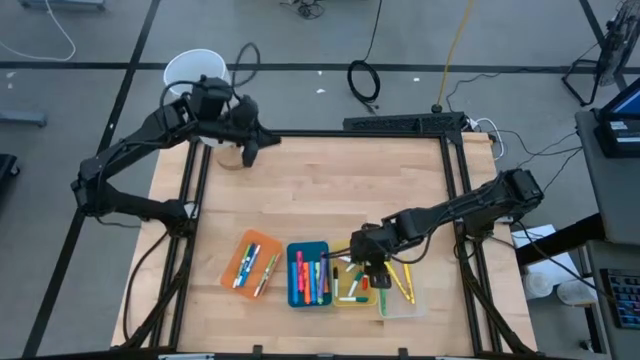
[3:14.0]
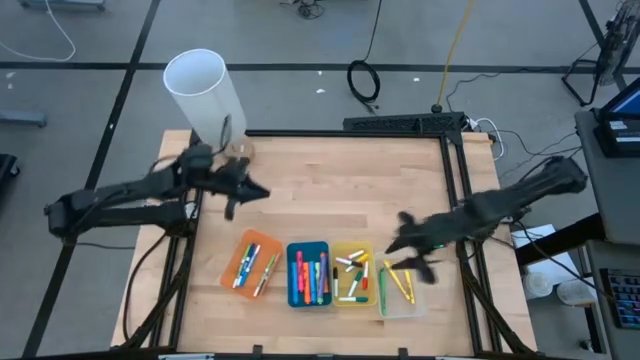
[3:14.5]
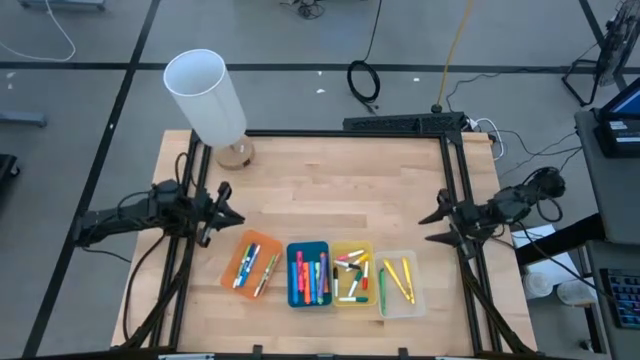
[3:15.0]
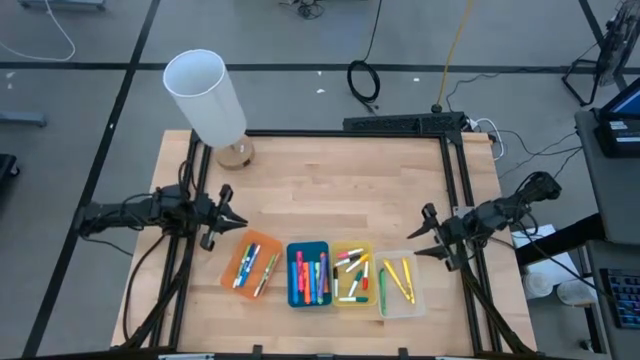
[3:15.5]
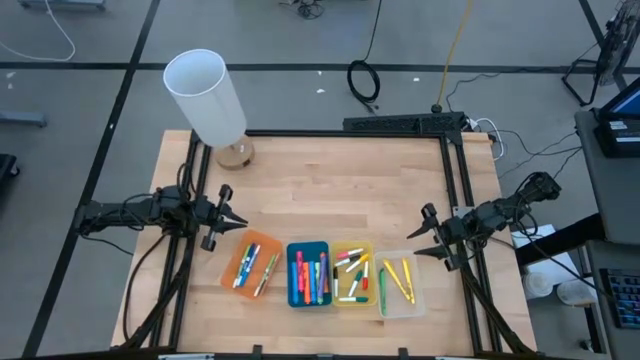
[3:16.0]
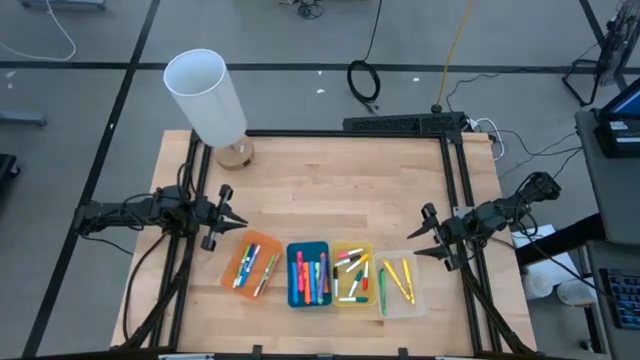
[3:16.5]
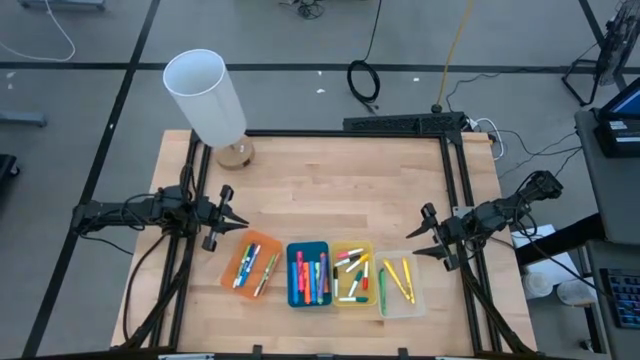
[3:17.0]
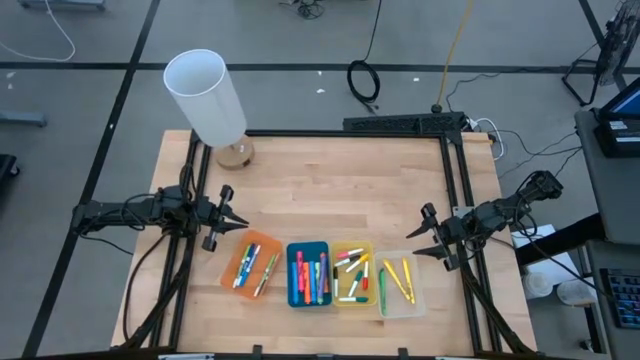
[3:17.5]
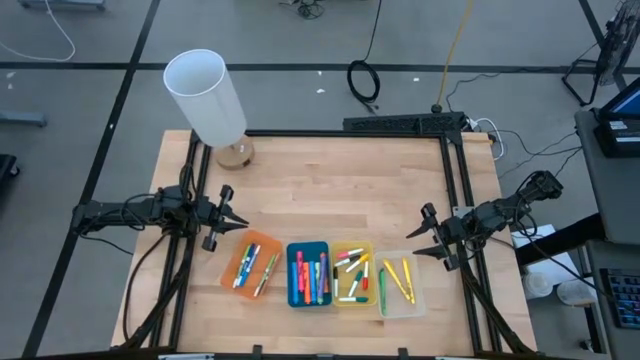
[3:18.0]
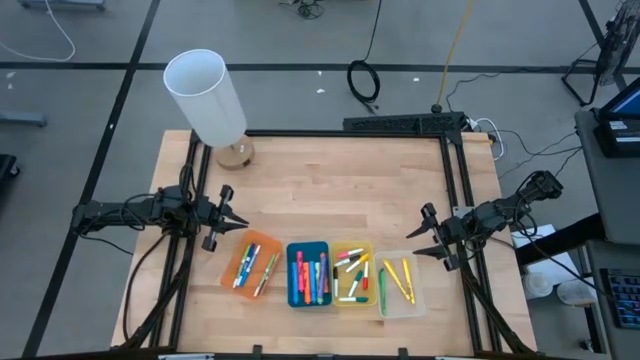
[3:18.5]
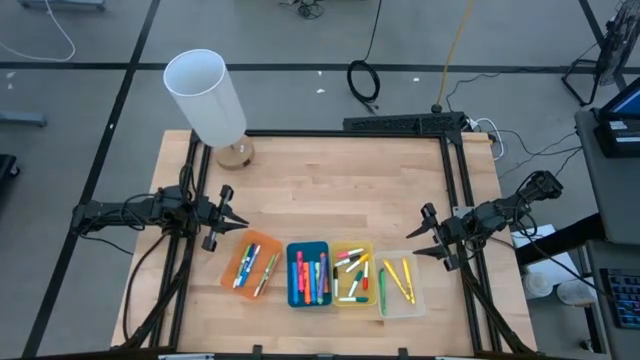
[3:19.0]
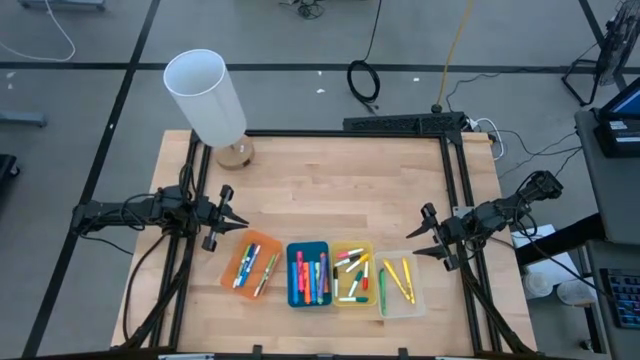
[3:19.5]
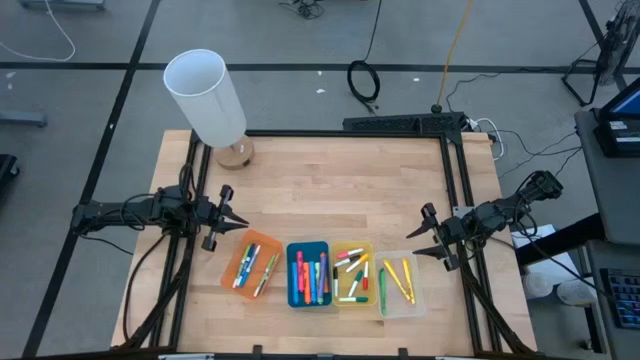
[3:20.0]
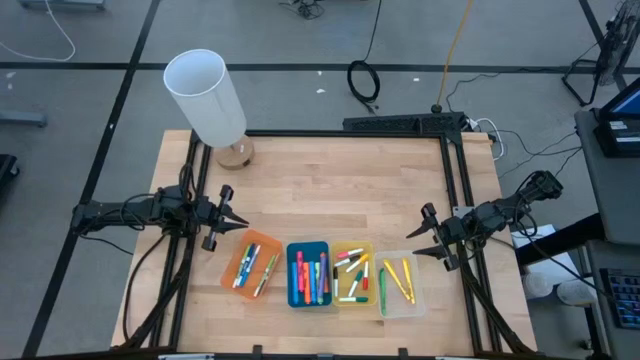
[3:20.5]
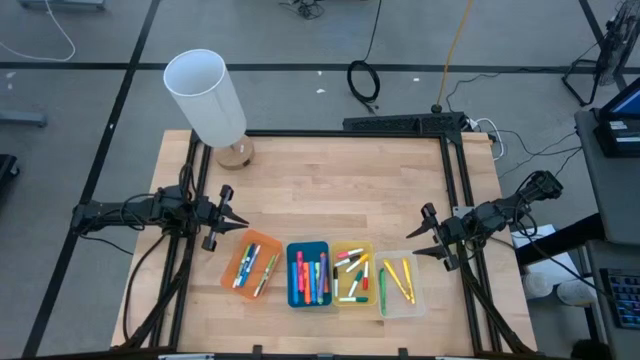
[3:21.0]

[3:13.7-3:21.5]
Task: Pick & Place Markers
Return to Home Position

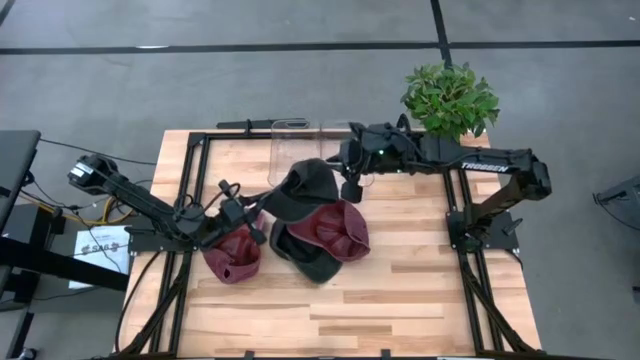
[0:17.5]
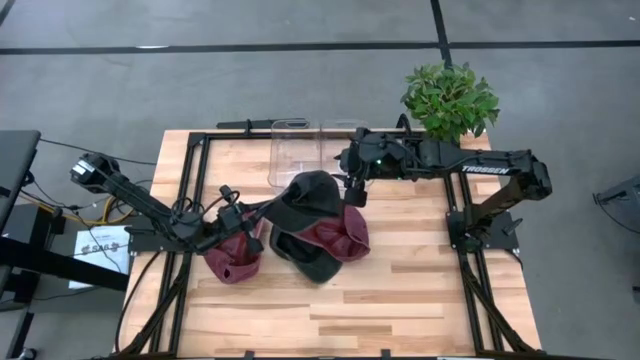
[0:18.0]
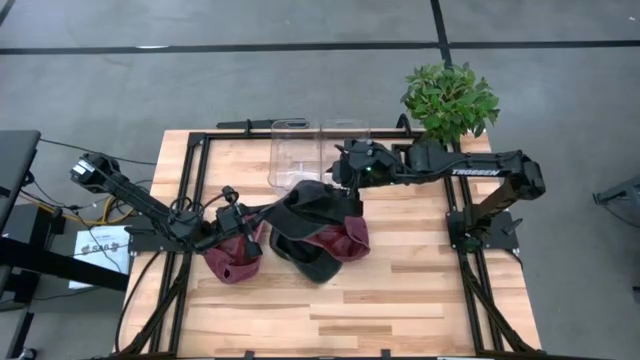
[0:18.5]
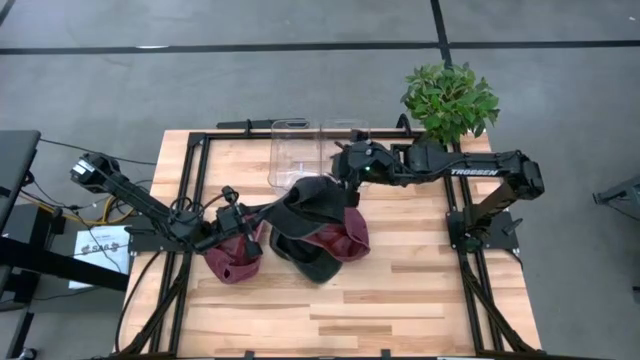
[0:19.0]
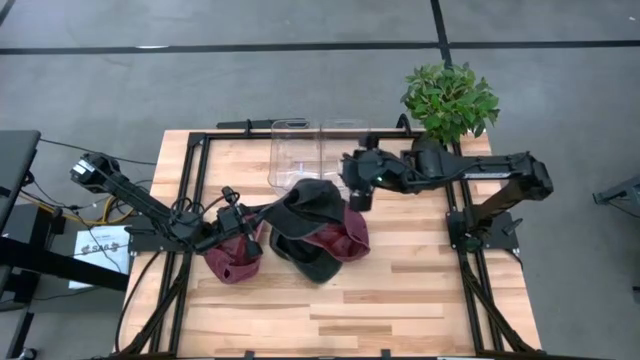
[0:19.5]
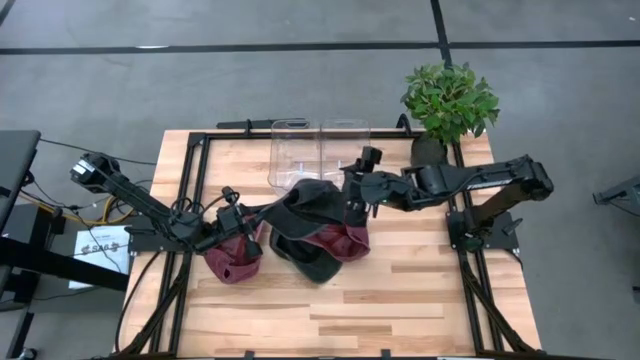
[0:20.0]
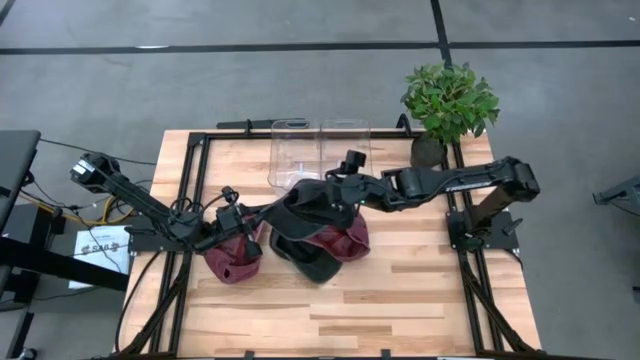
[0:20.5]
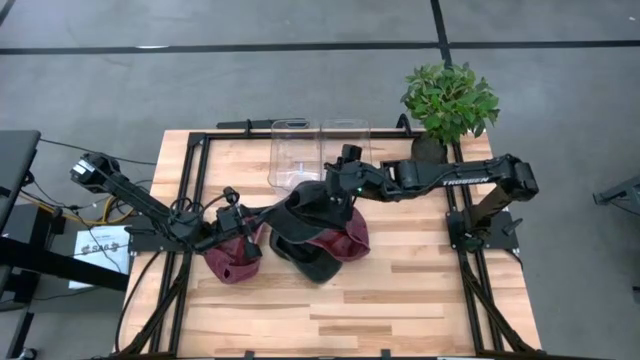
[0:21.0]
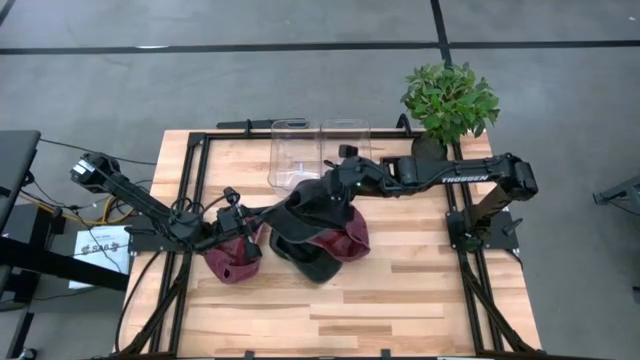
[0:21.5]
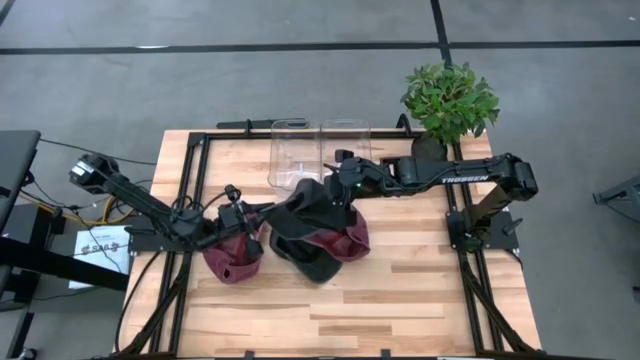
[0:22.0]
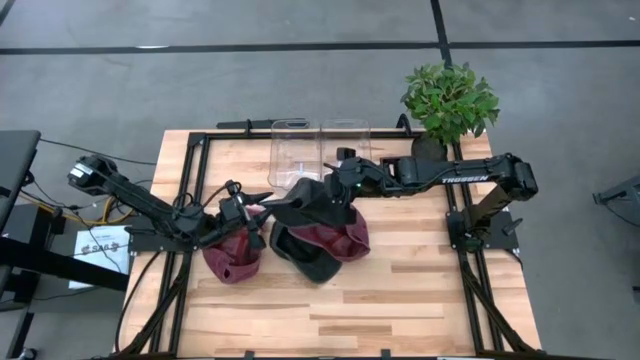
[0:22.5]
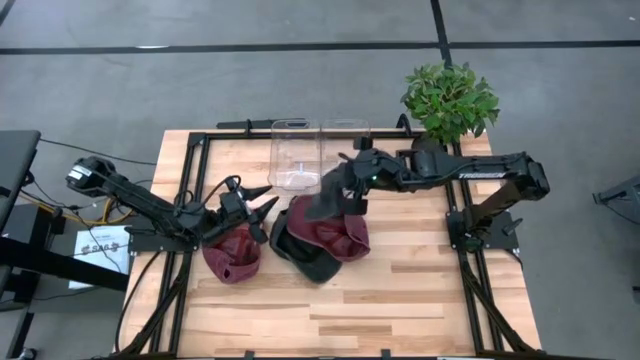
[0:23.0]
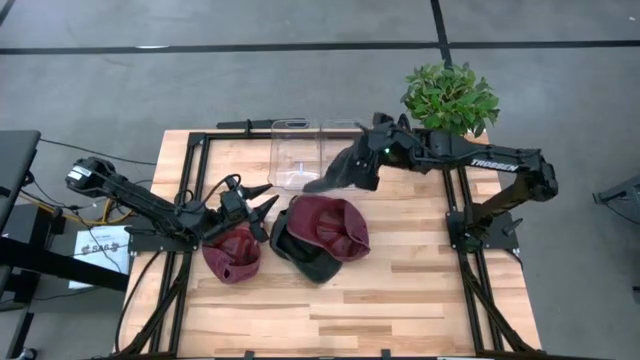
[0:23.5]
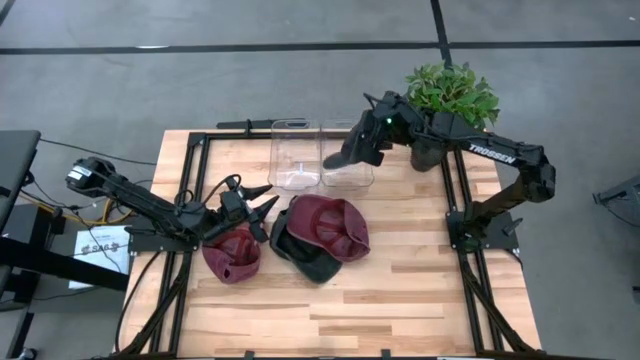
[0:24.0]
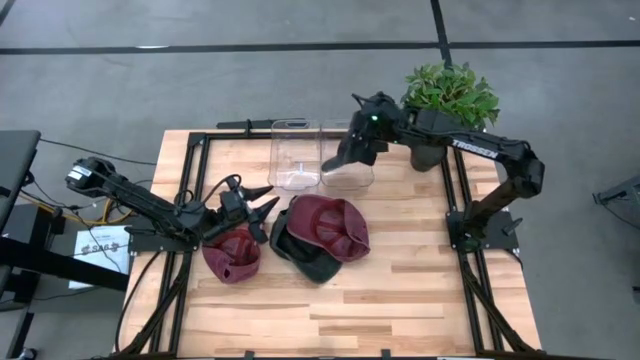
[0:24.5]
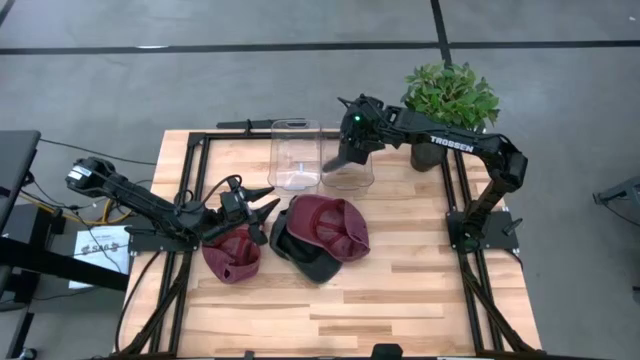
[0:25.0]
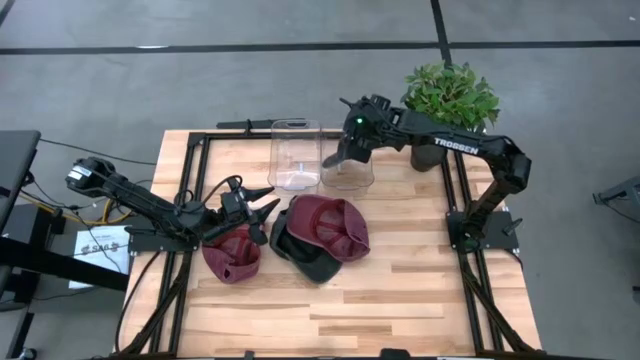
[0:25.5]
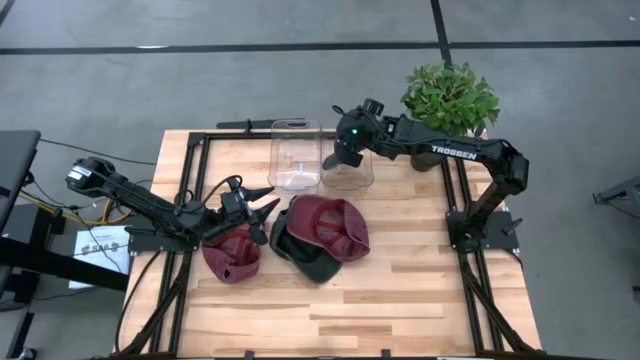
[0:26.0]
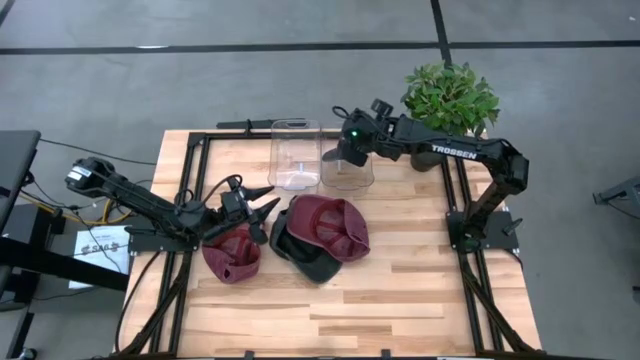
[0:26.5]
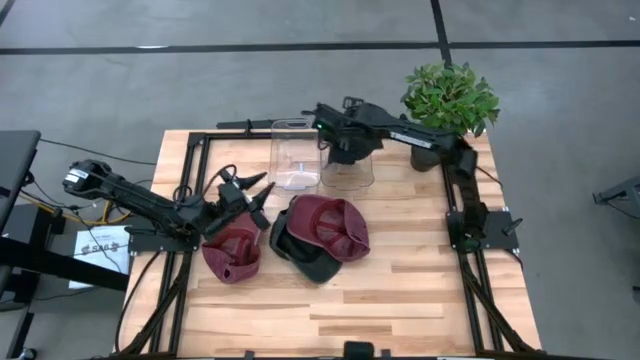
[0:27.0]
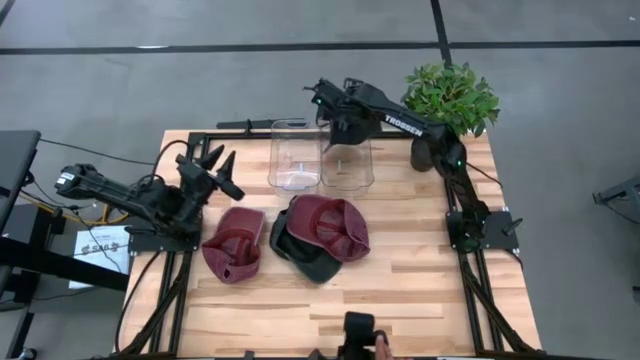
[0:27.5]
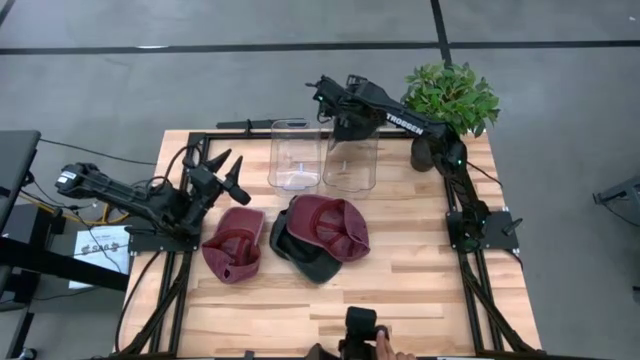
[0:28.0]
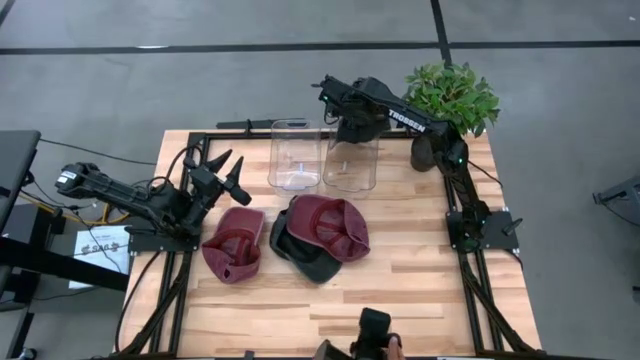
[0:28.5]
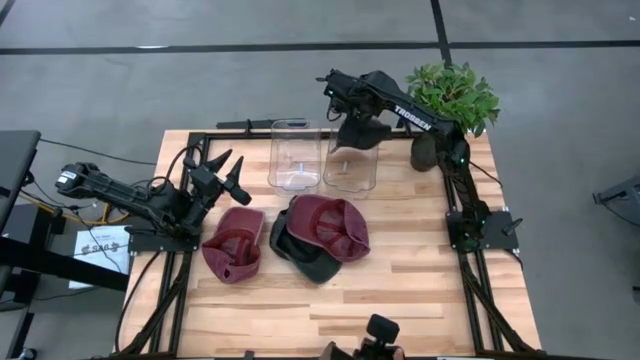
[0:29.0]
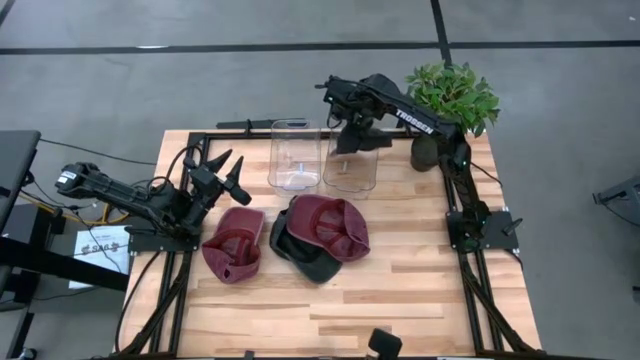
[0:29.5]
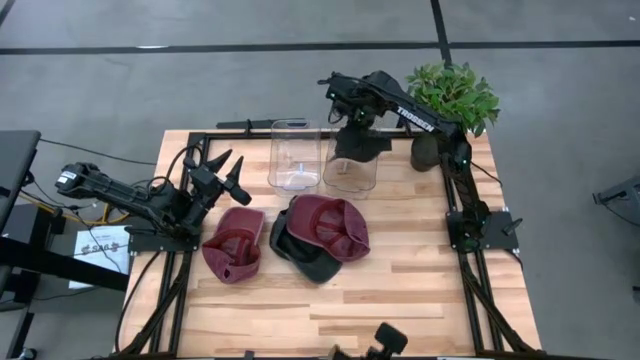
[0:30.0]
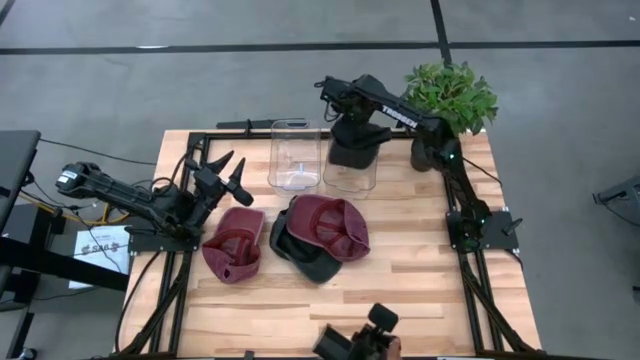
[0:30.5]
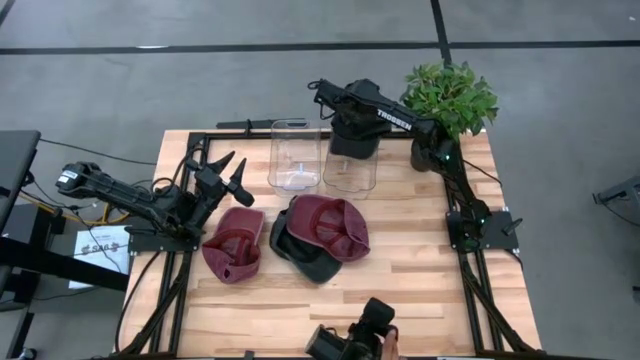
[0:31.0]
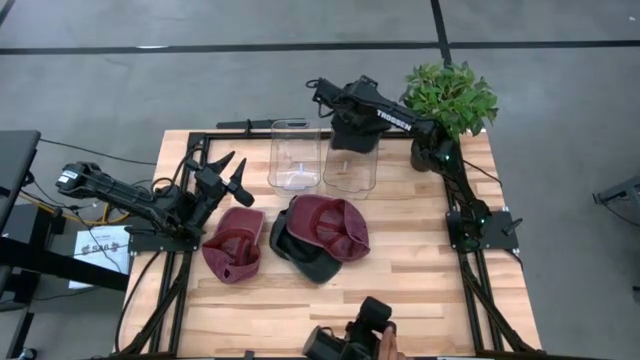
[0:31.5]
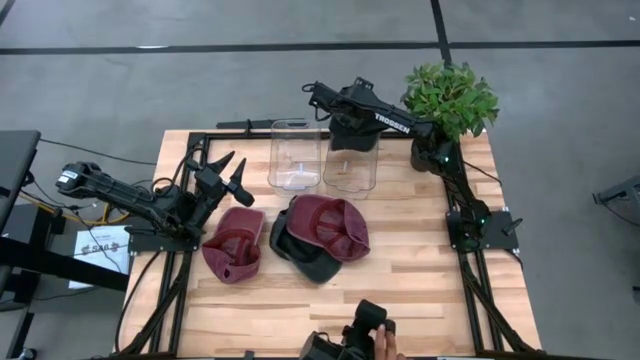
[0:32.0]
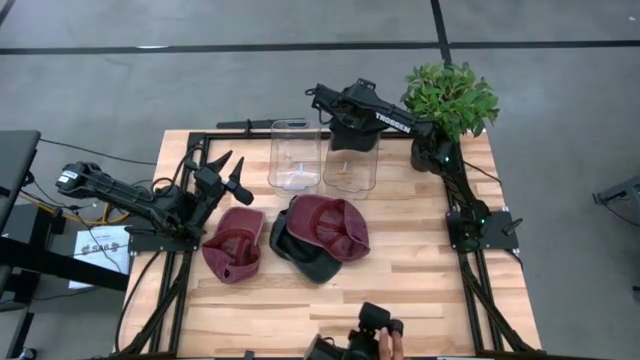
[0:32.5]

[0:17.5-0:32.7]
Task: Pick & Place hat
Put the right black cap into the right transparent bin
